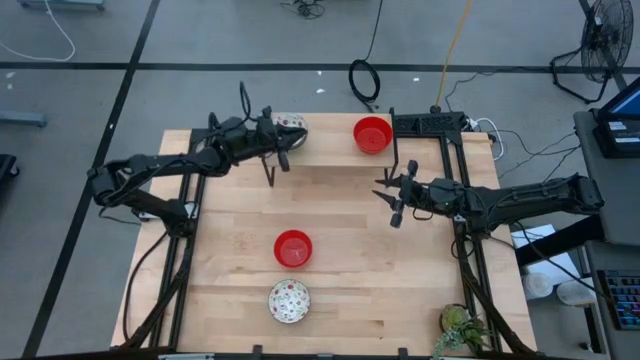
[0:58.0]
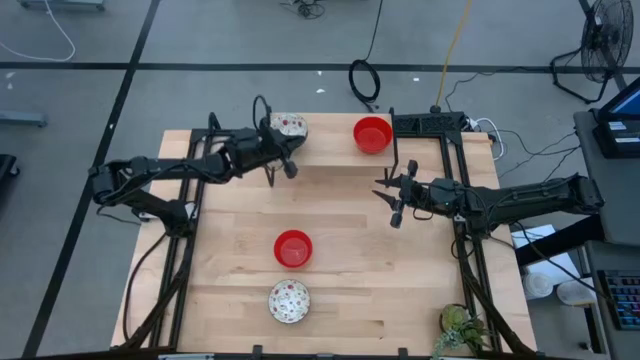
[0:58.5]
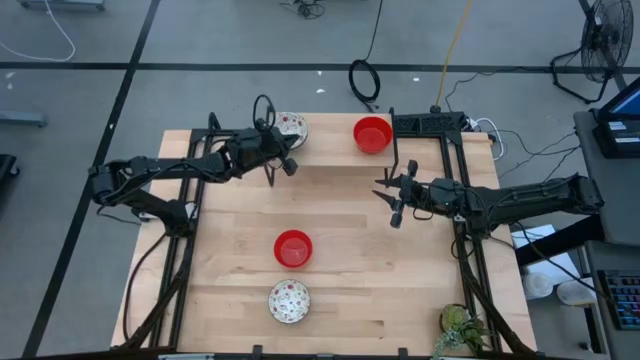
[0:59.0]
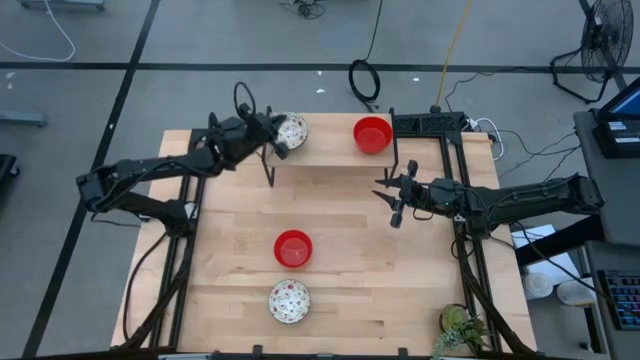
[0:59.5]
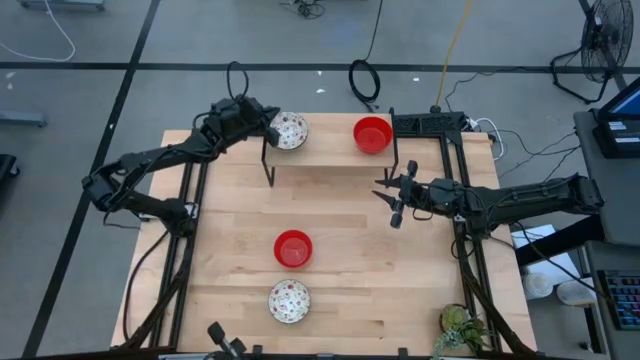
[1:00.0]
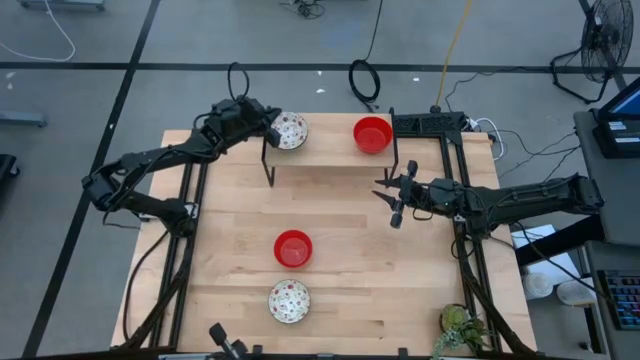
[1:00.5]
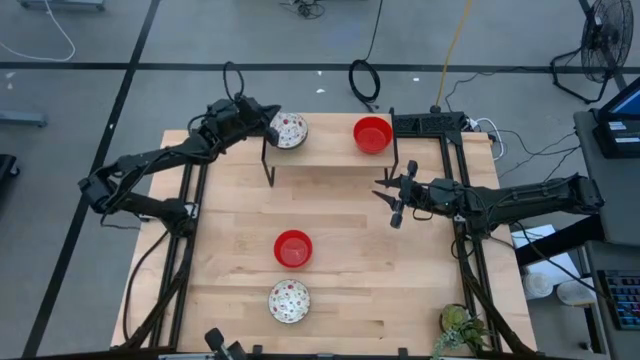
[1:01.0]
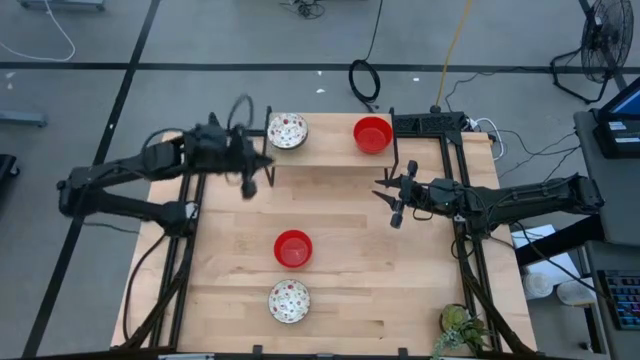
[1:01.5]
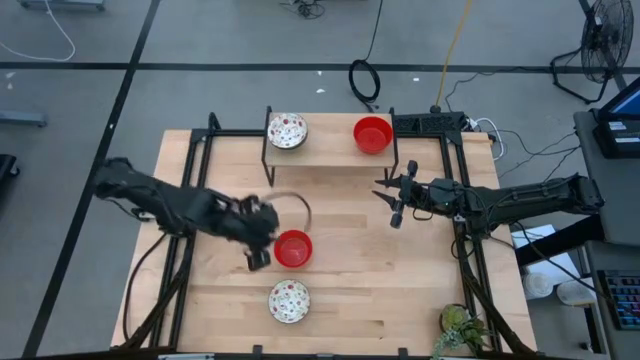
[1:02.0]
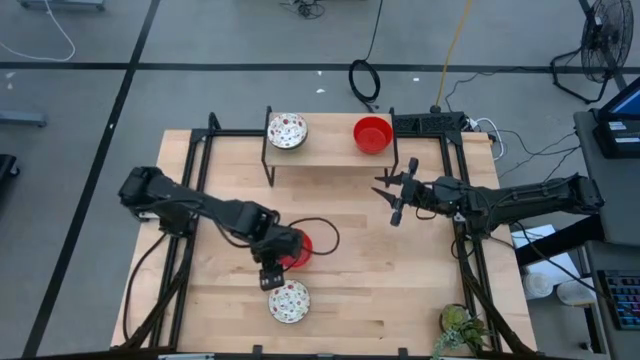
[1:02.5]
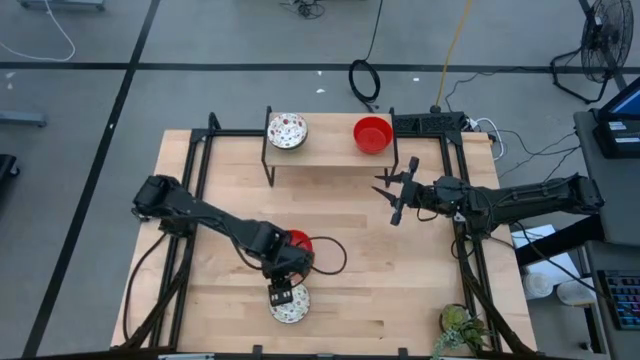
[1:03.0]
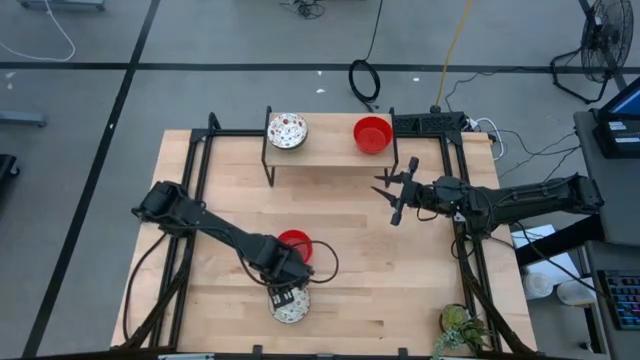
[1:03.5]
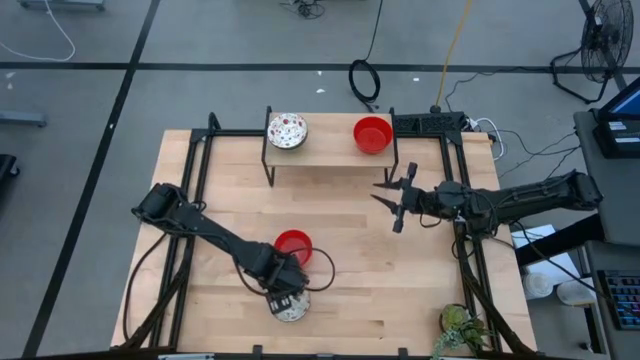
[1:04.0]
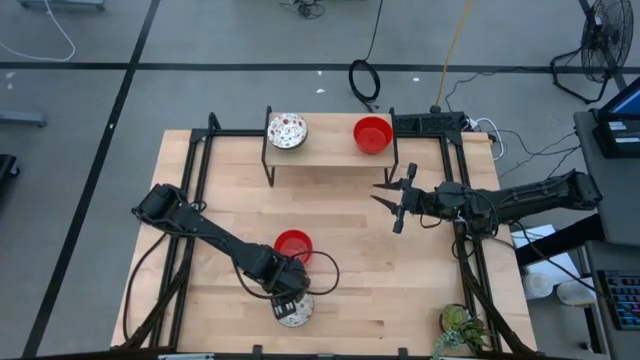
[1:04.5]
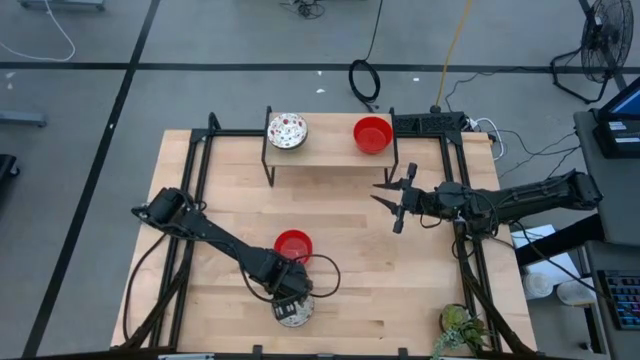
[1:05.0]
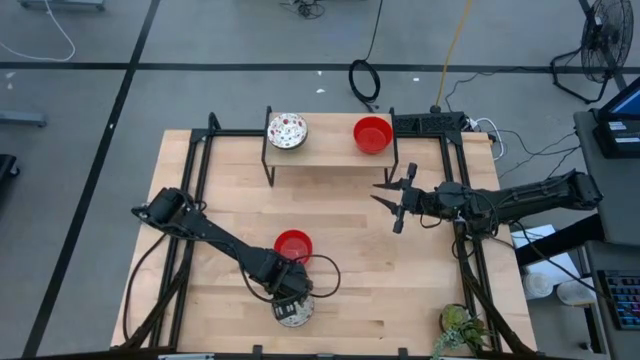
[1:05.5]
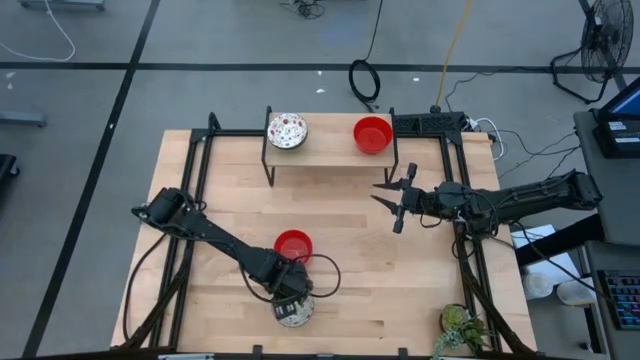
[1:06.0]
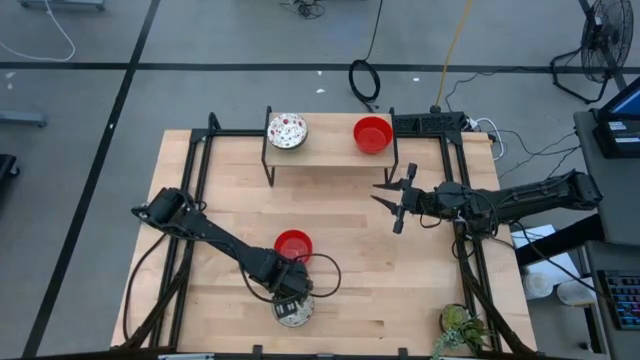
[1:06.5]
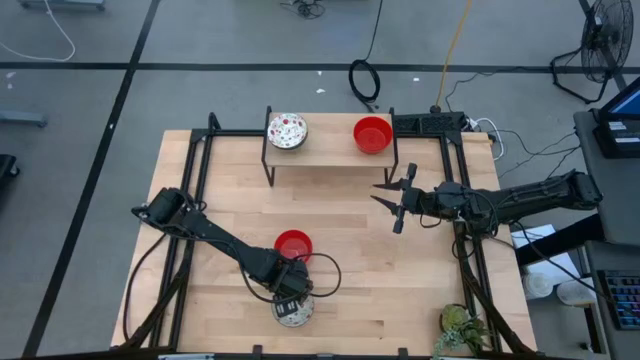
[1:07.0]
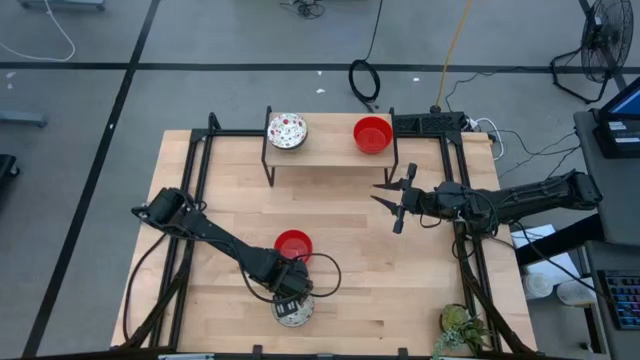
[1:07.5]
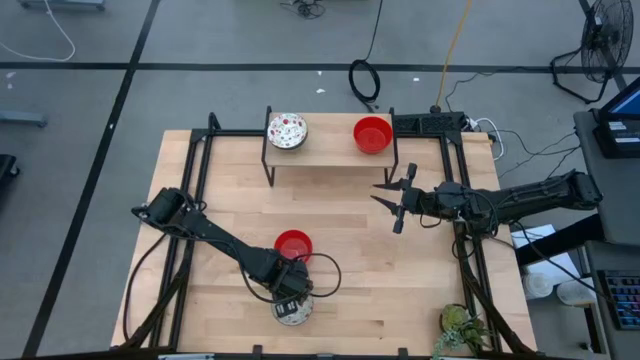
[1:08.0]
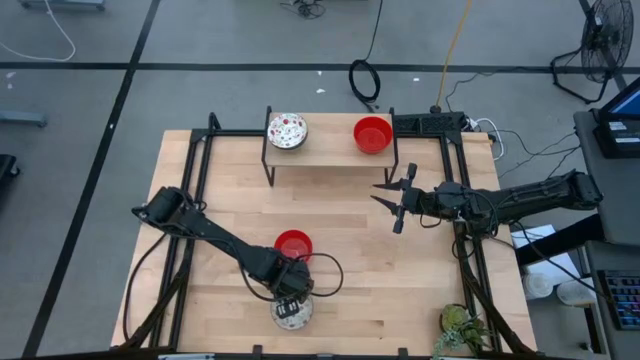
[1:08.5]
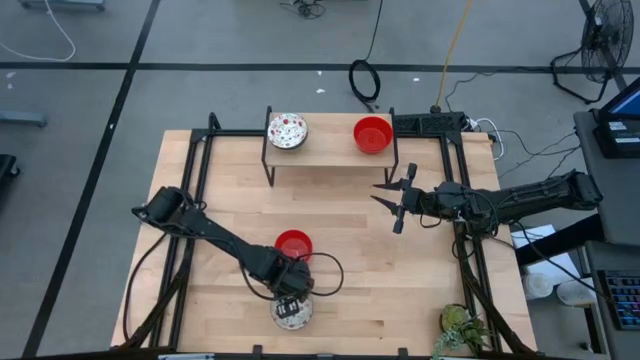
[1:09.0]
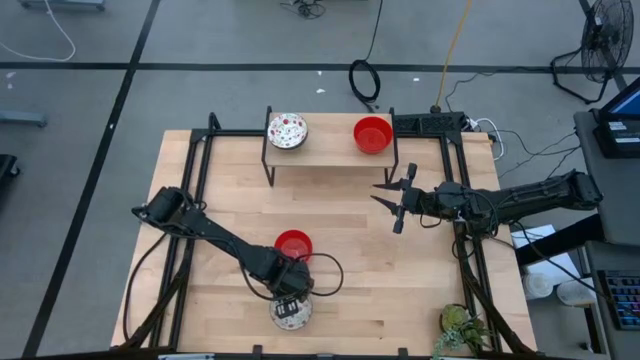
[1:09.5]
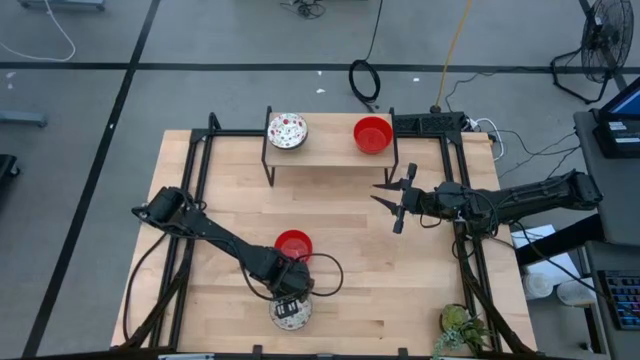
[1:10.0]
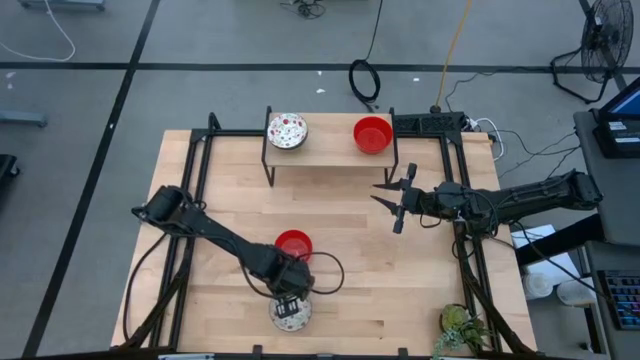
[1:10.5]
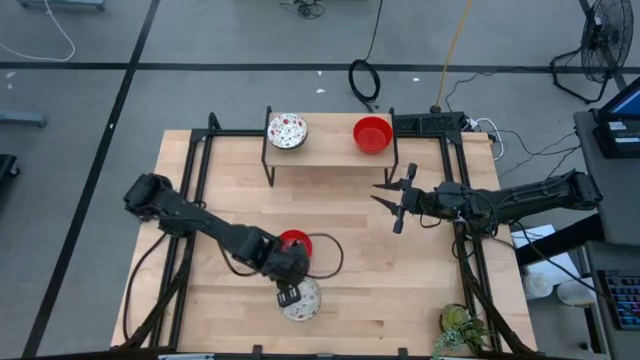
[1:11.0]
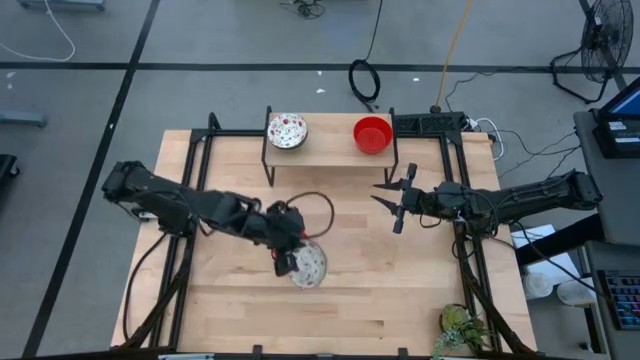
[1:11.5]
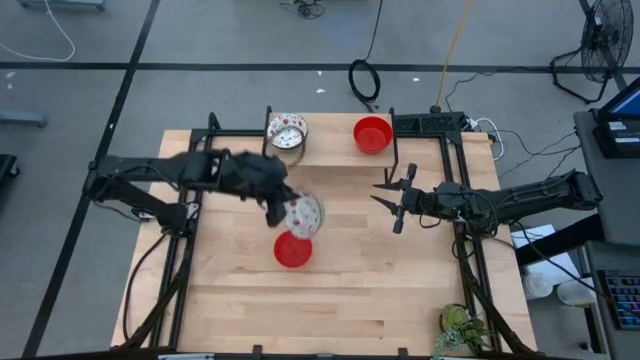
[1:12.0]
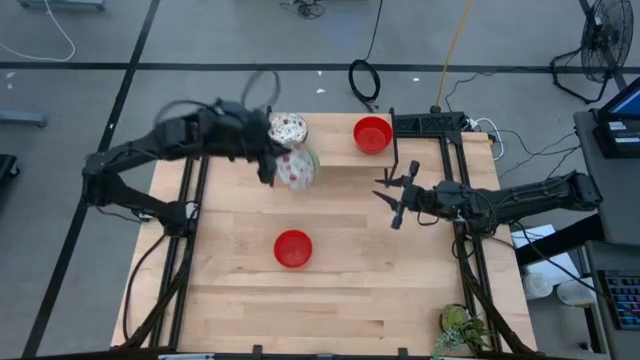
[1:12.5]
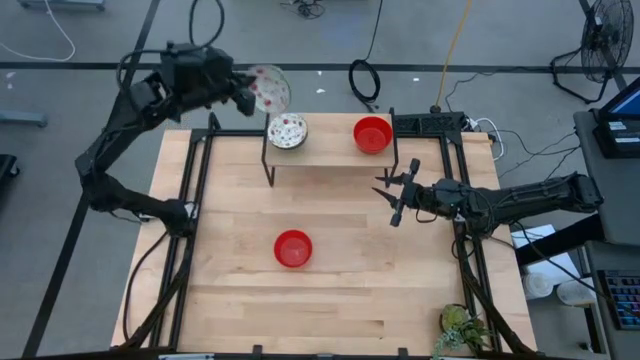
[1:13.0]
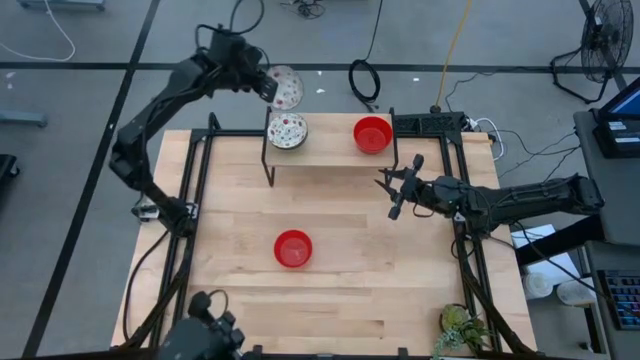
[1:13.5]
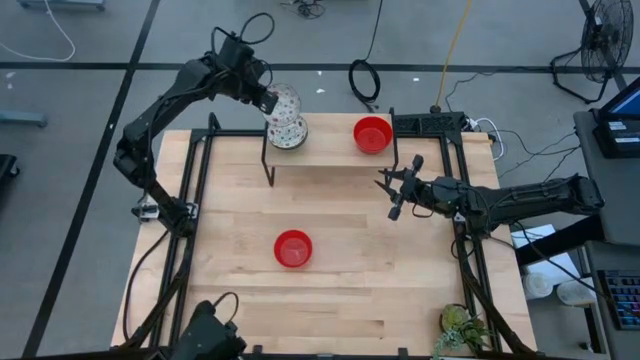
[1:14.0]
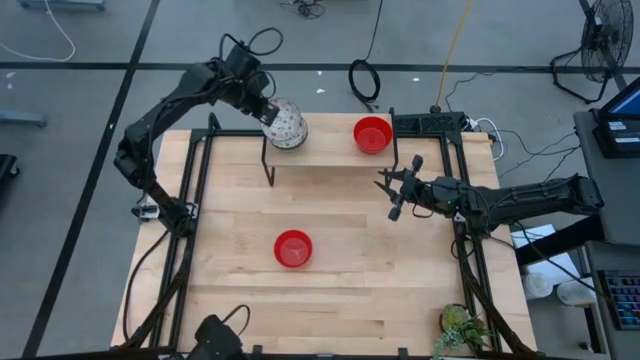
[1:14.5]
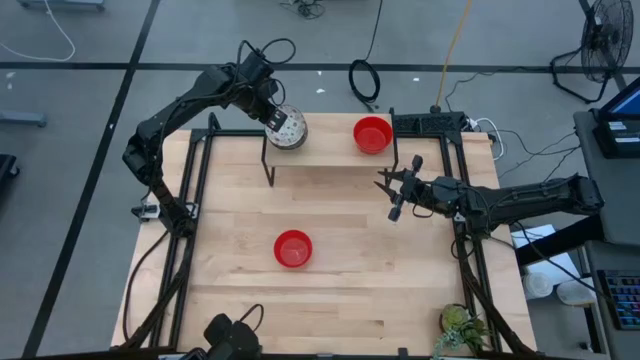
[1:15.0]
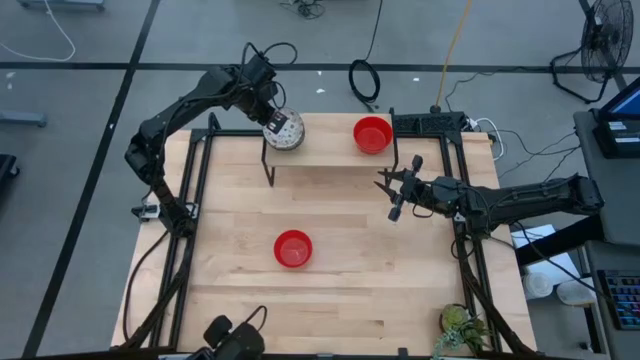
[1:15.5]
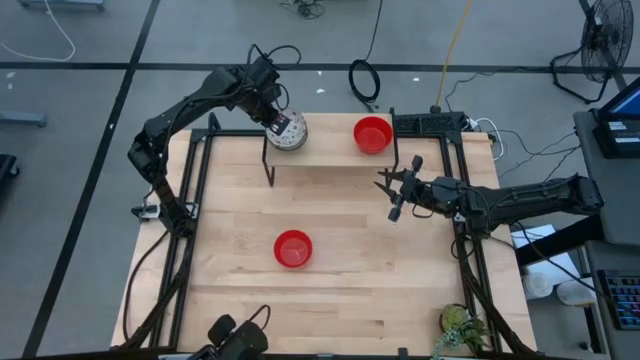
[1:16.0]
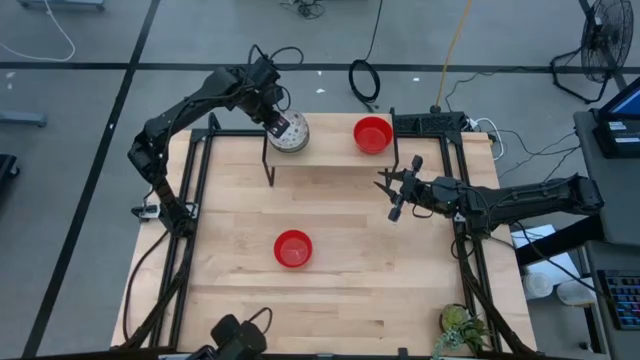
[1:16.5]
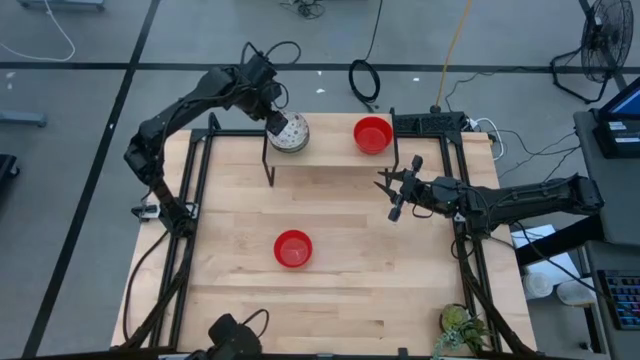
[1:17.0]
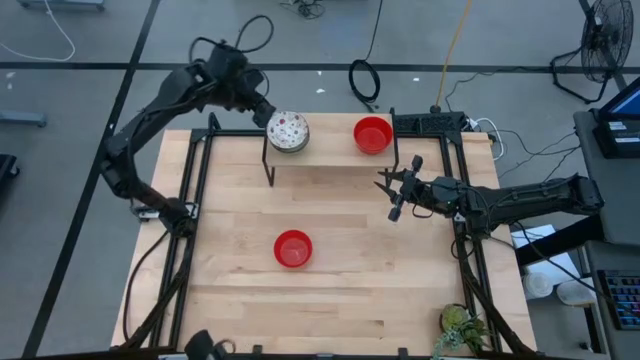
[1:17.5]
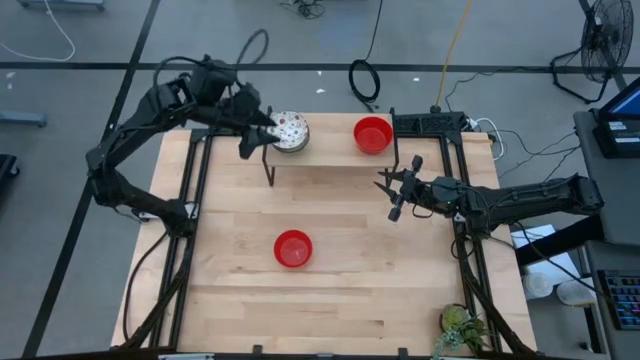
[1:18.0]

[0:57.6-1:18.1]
Task: Pick & Place Mini bowls
Stack the white patterned bowl on the white patterned bowls on the shelf
